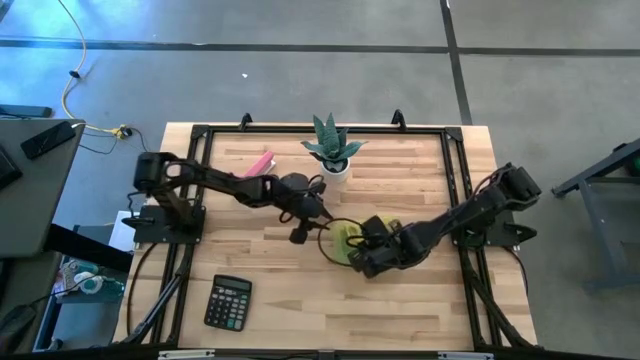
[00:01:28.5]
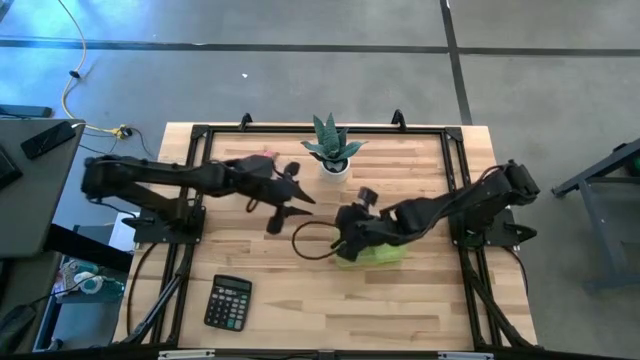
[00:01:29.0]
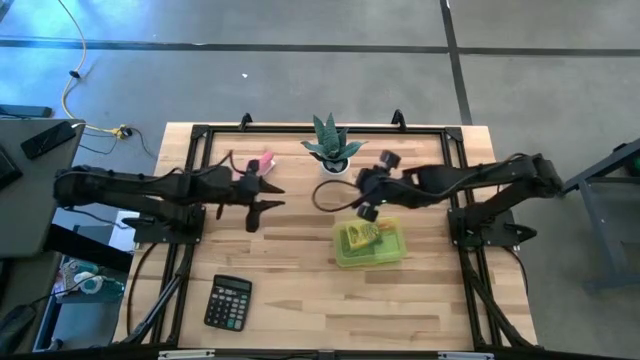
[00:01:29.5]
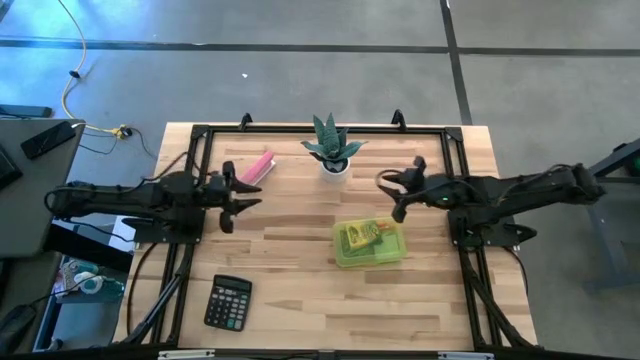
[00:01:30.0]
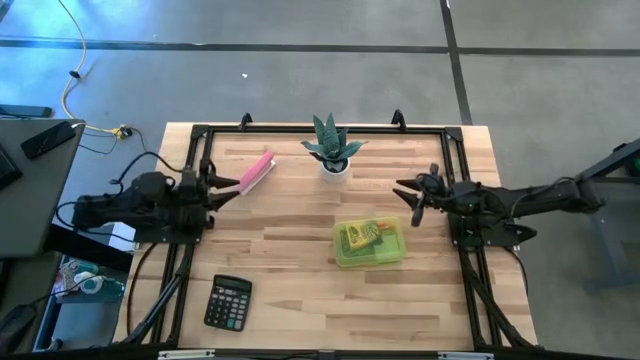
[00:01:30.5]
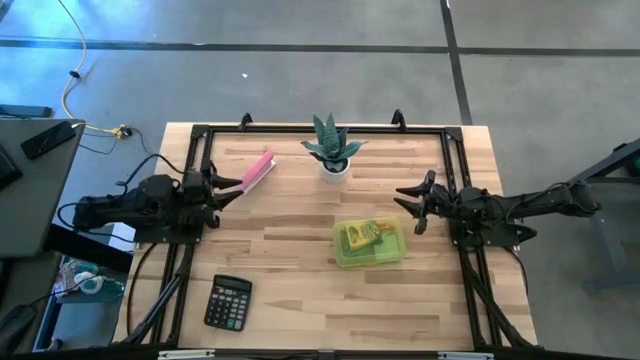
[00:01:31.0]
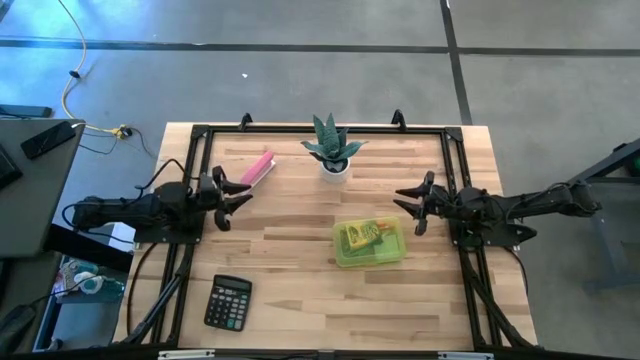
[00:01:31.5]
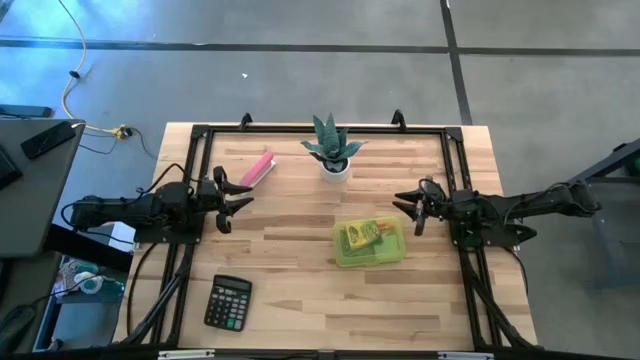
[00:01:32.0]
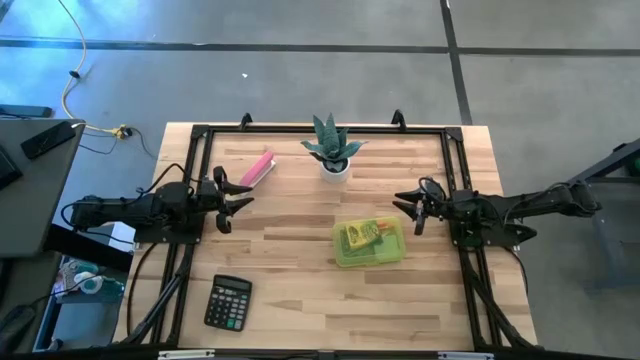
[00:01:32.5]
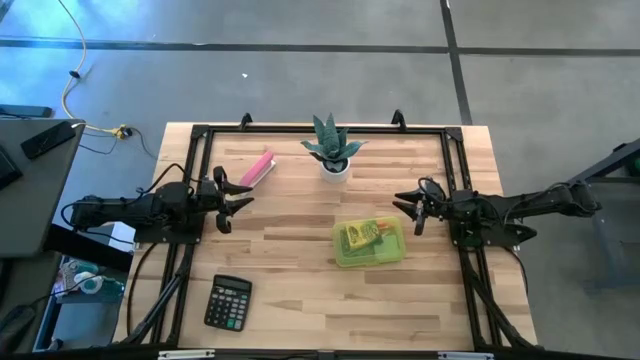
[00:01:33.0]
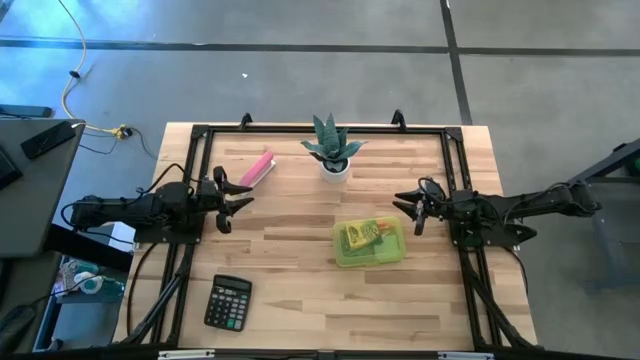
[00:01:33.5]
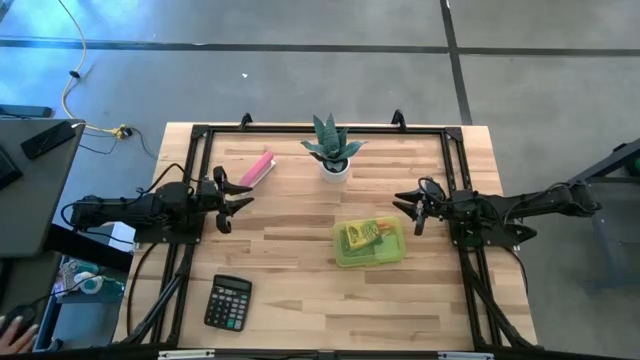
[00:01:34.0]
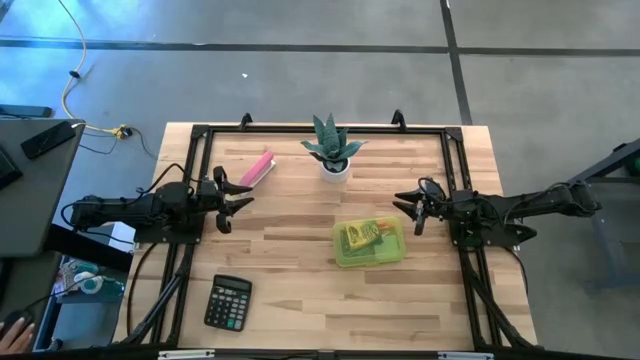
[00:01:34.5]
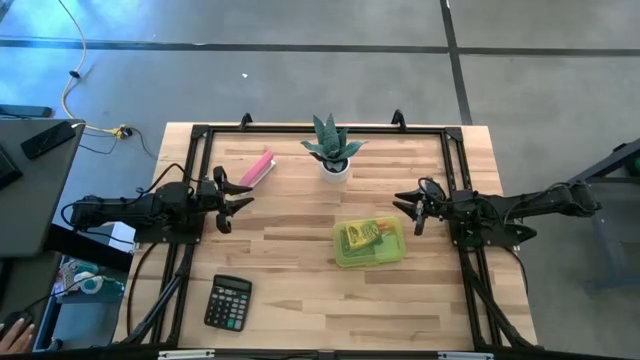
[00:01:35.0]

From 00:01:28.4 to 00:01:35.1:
Task: Pack school essentials
Return to Home Position

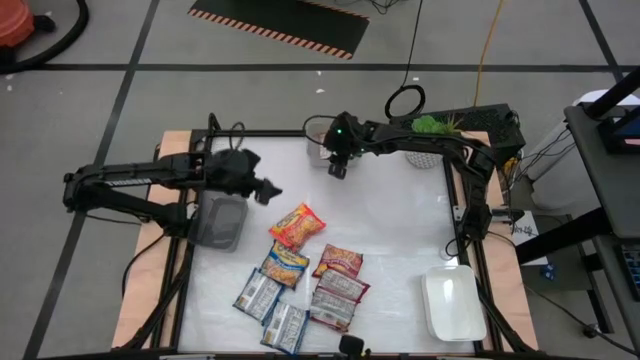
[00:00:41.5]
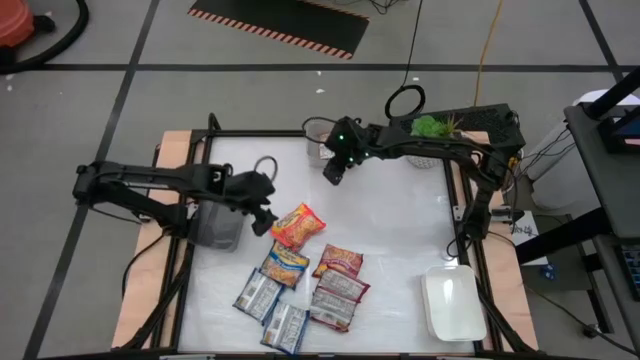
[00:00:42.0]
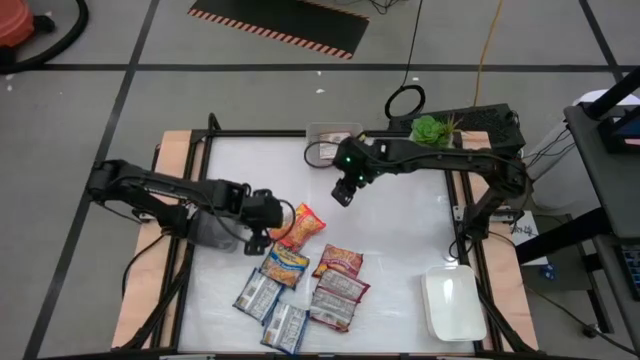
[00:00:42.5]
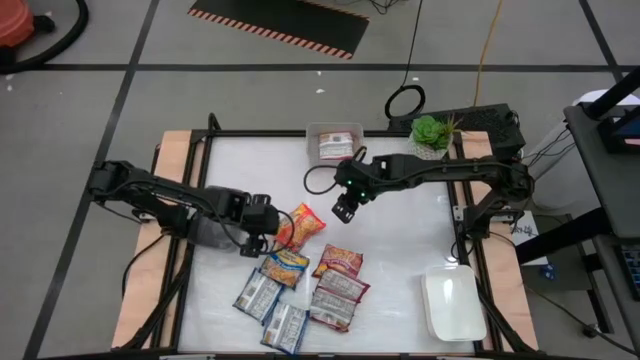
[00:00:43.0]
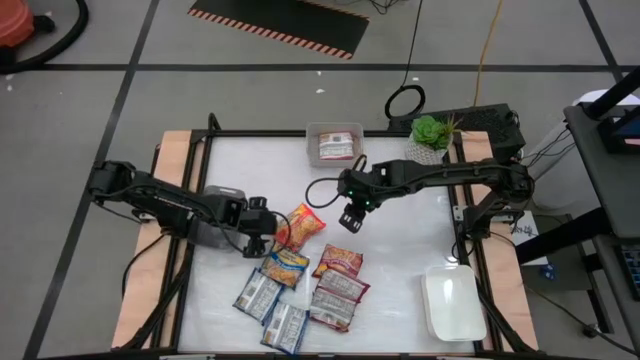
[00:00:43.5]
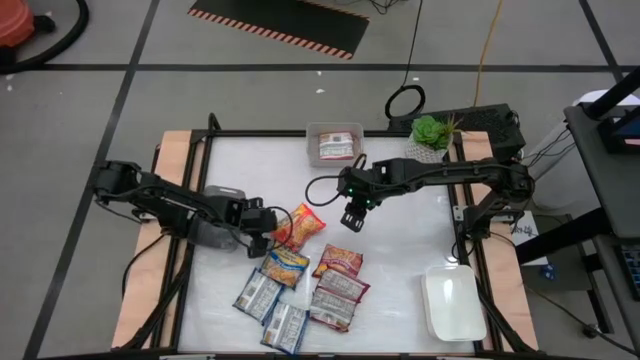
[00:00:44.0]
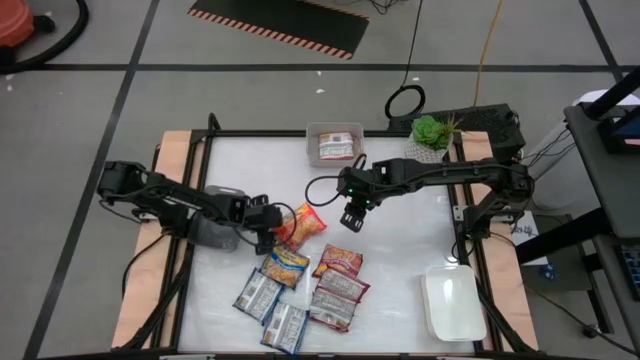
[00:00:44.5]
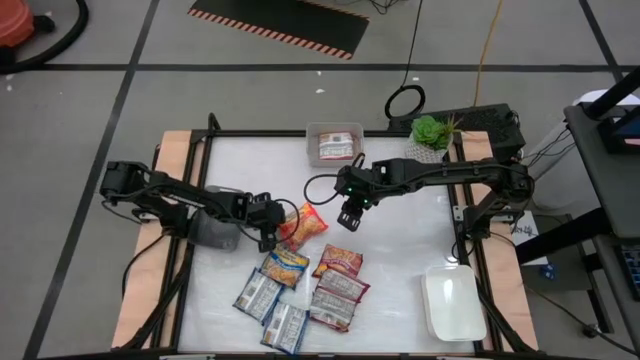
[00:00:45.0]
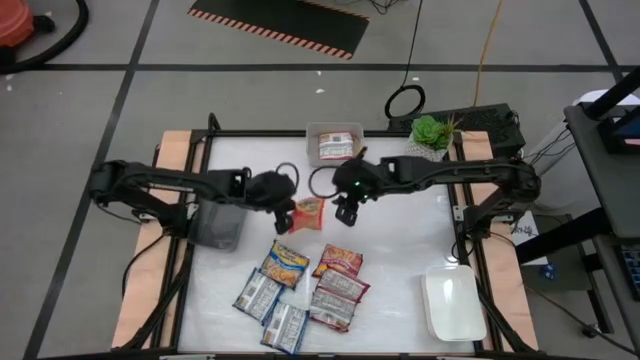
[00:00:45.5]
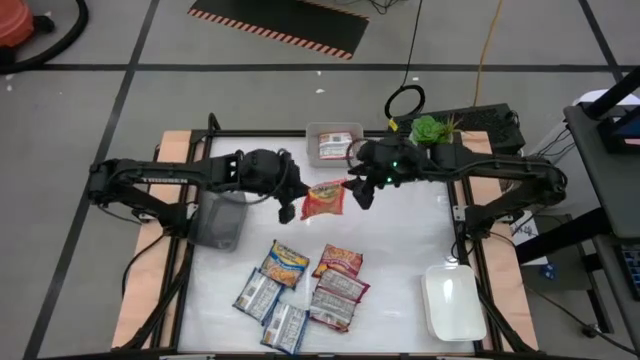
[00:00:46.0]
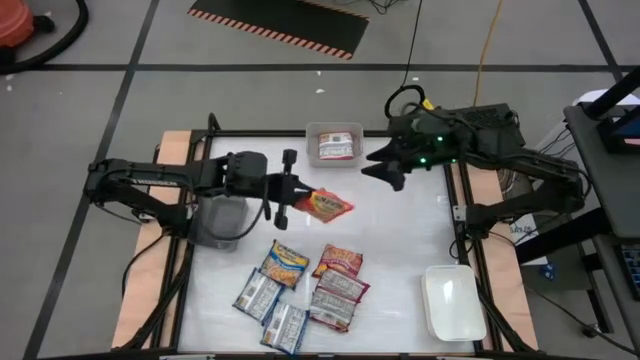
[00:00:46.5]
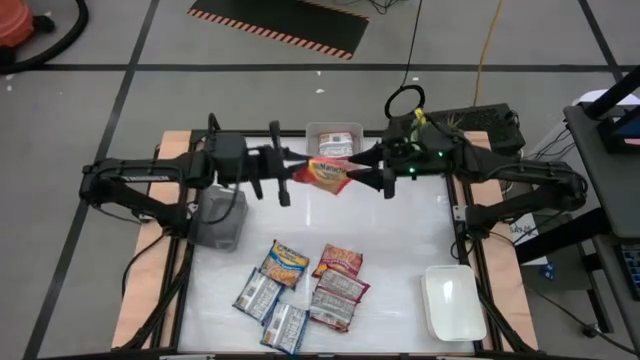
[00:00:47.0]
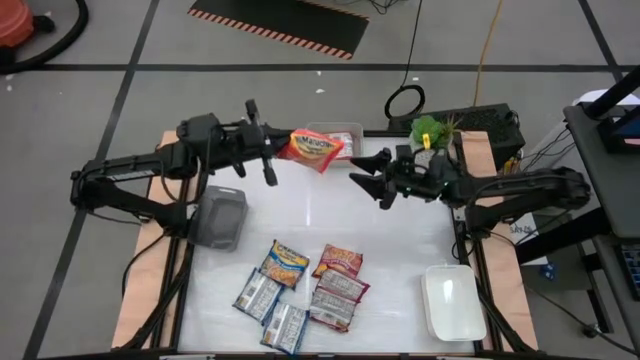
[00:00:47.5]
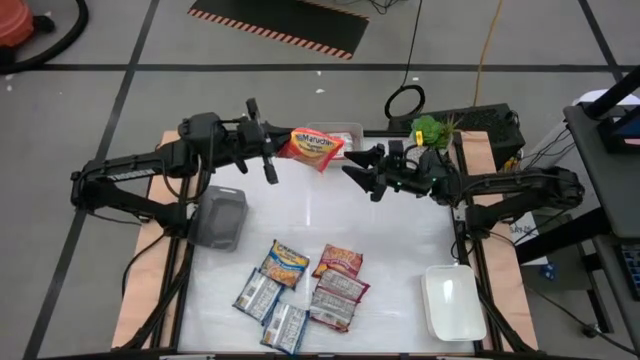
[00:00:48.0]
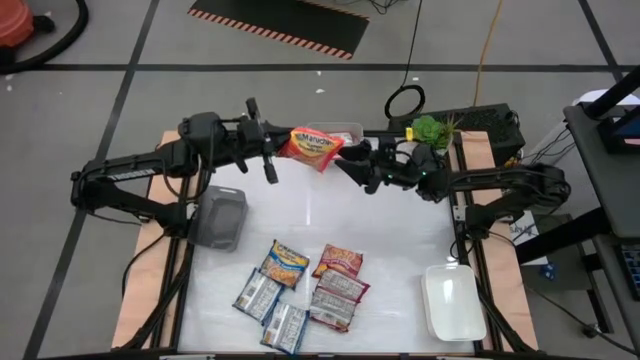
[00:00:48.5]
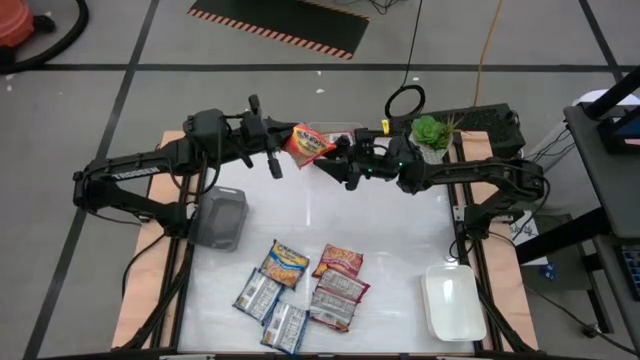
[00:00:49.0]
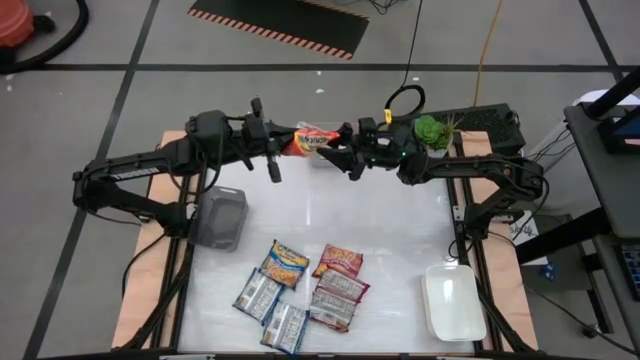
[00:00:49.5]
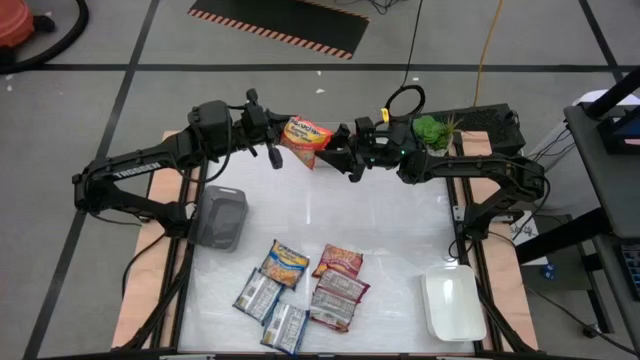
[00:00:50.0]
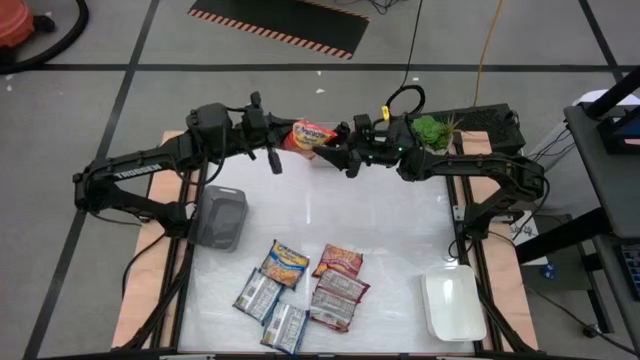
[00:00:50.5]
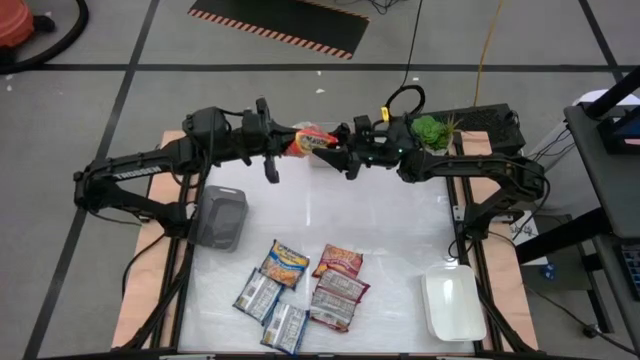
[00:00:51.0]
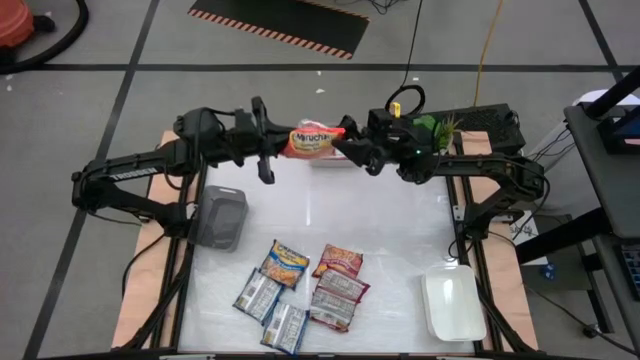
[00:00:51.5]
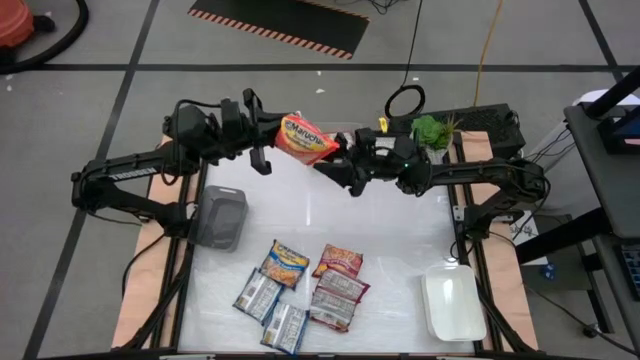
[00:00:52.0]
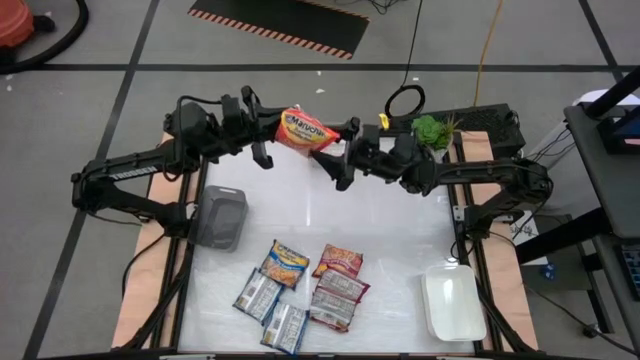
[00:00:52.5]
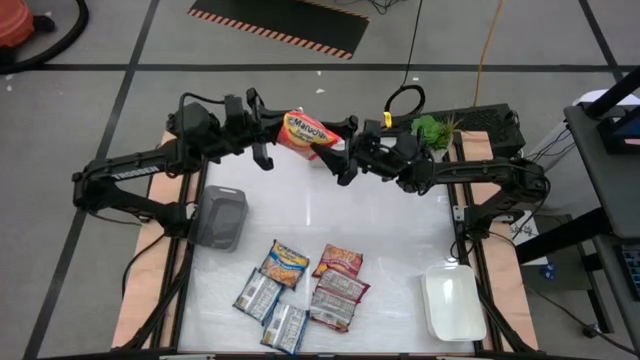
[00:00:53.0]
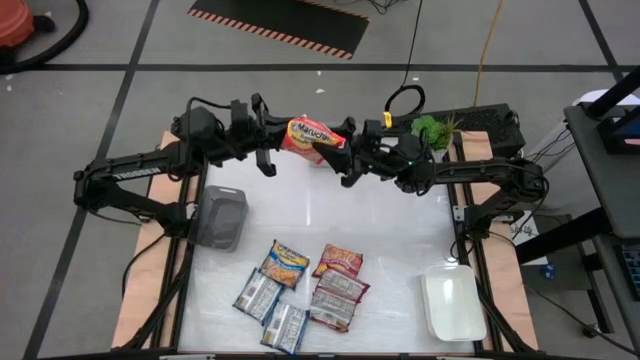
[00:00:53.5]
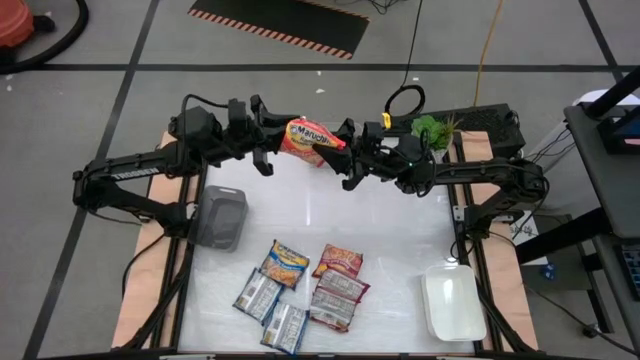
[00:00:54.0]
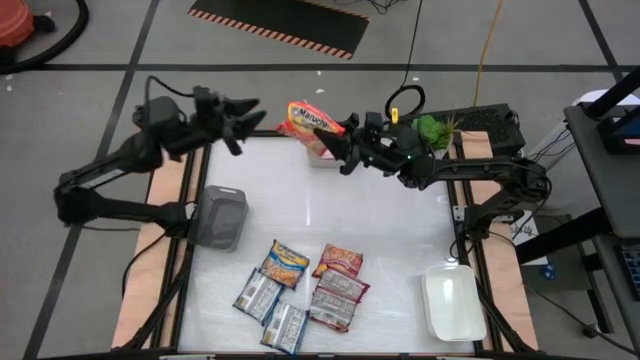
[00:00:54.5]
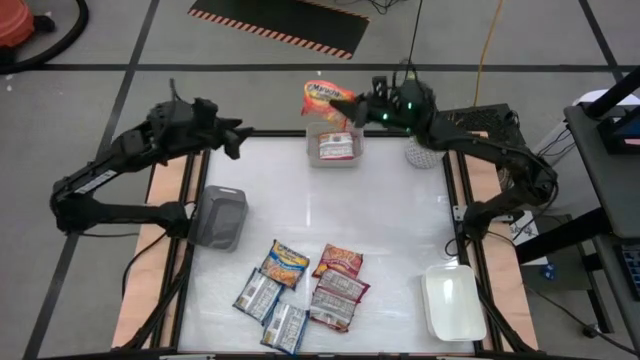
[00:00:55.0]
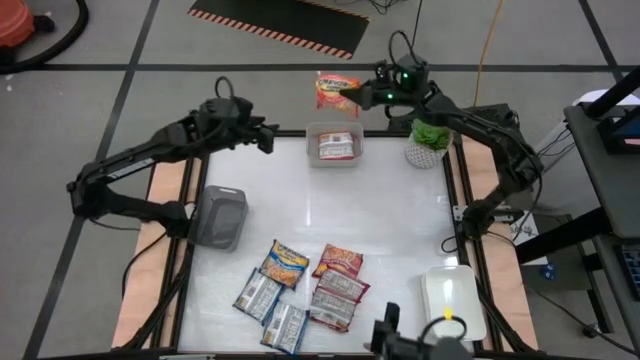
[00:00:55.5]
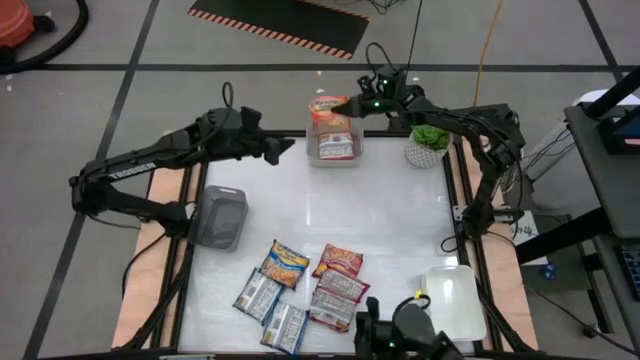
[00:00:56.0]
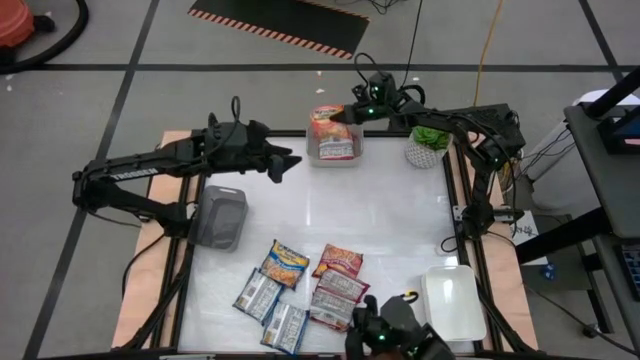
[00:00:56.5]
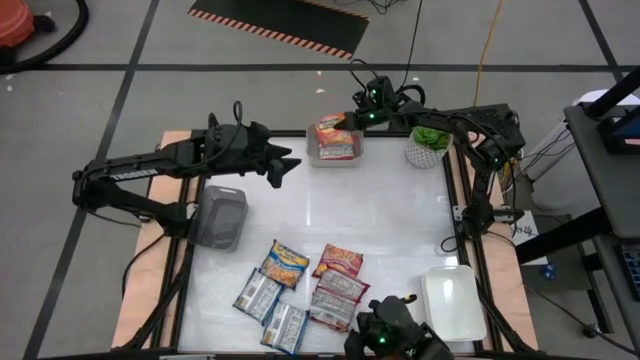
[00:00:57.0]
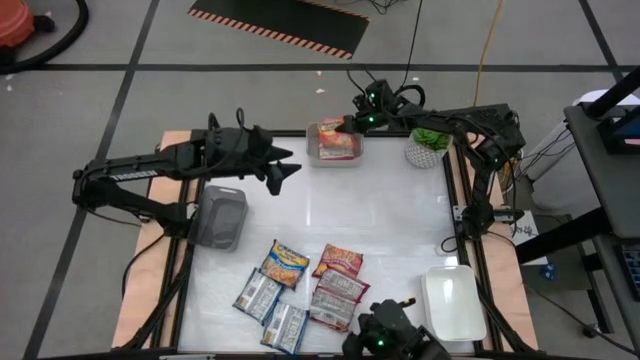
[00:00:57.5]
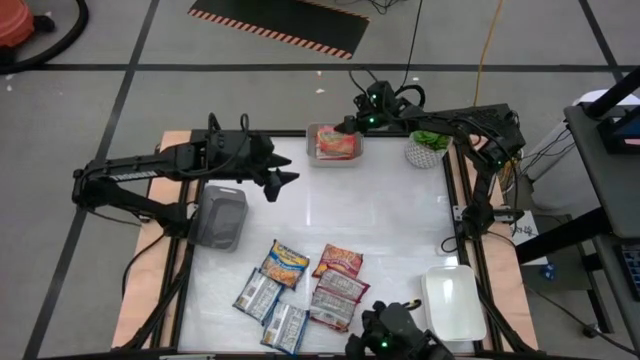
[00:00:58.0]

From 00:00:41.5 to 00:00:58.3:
Task: Sort Maruchan noodles
Put the orange noodle pack into the gray bin
